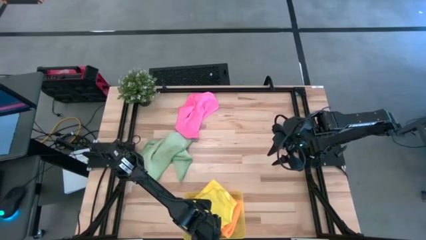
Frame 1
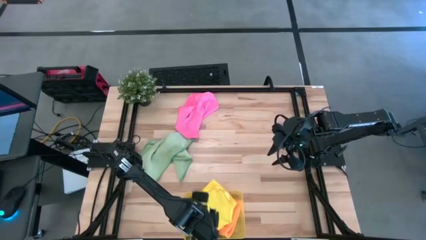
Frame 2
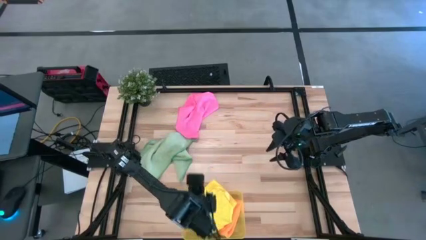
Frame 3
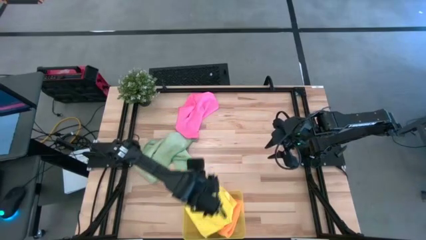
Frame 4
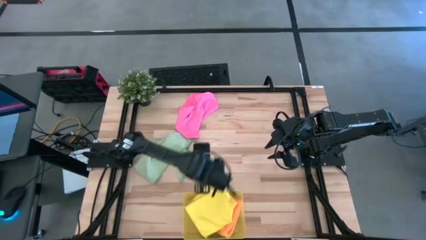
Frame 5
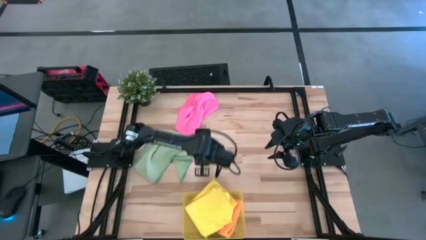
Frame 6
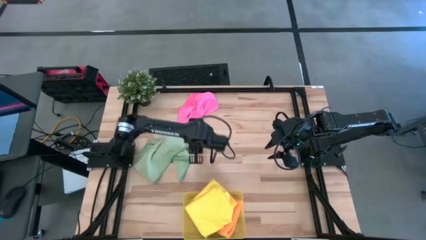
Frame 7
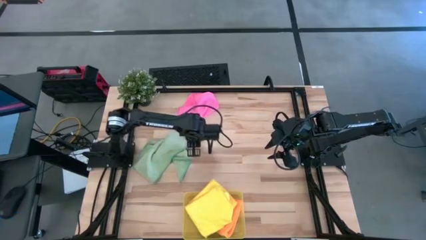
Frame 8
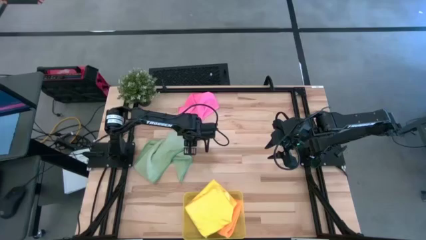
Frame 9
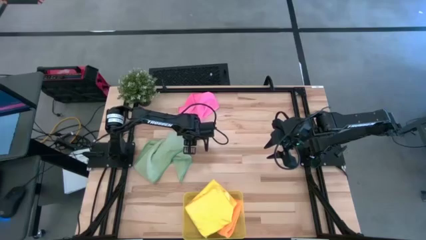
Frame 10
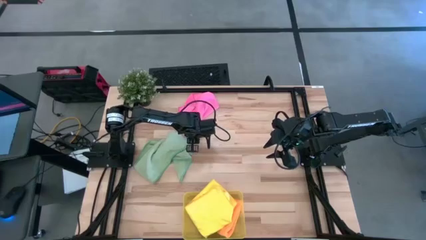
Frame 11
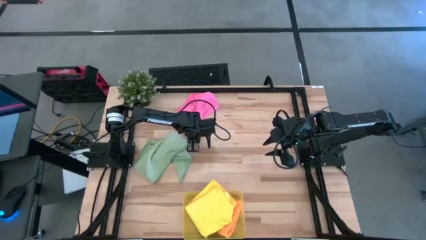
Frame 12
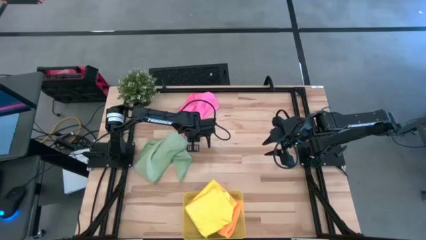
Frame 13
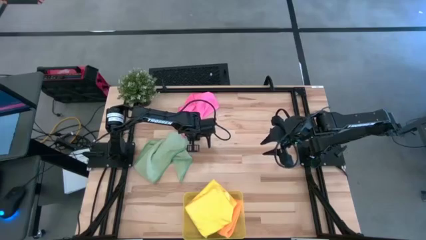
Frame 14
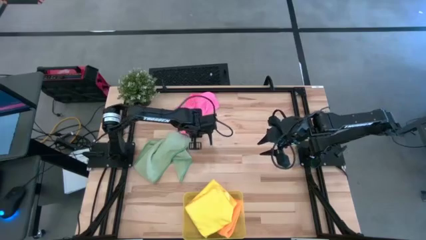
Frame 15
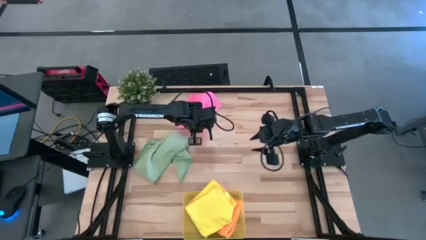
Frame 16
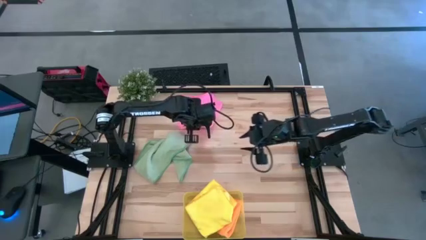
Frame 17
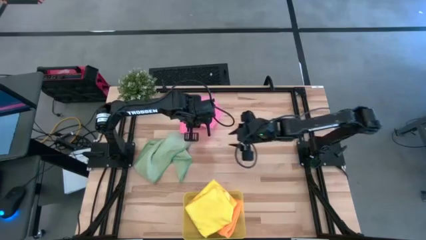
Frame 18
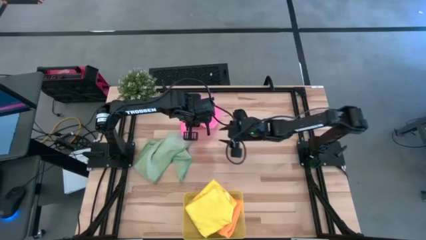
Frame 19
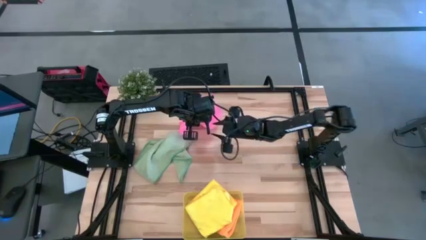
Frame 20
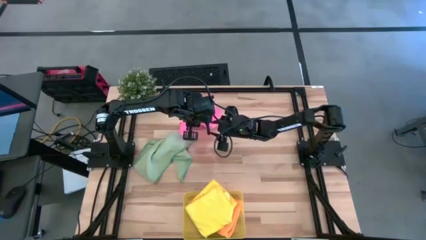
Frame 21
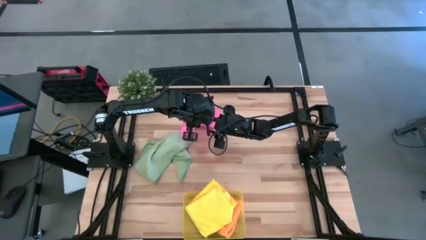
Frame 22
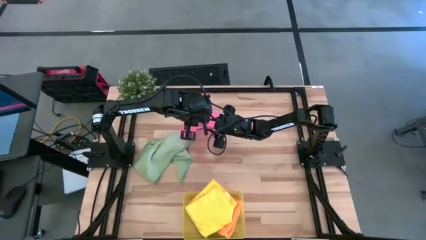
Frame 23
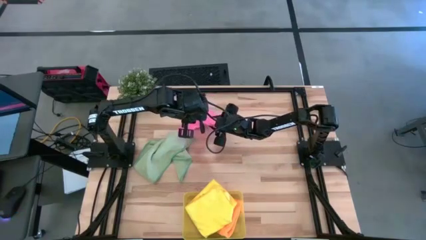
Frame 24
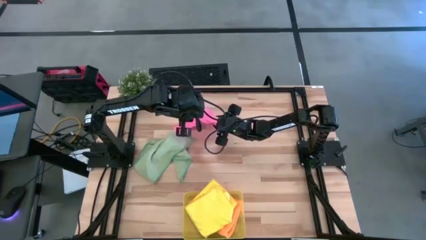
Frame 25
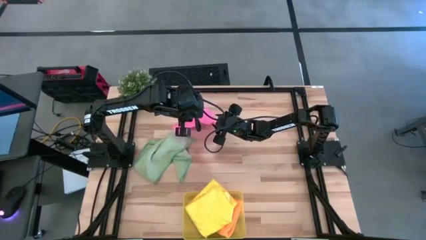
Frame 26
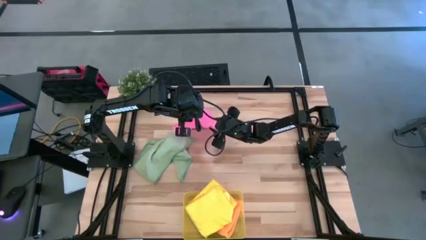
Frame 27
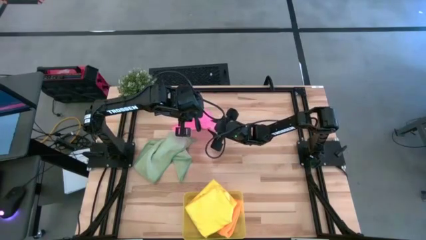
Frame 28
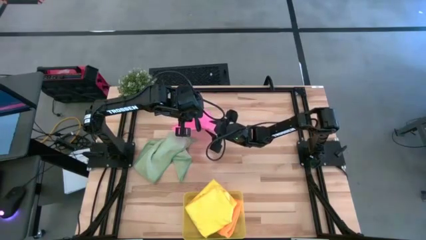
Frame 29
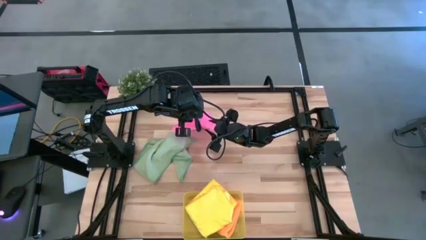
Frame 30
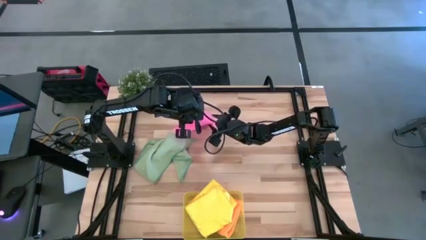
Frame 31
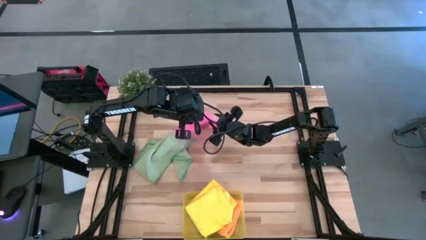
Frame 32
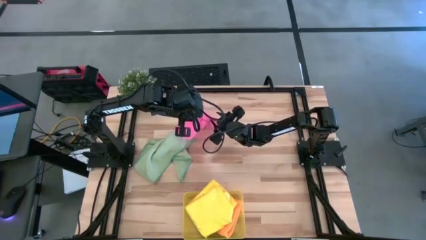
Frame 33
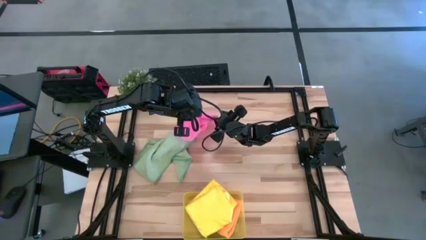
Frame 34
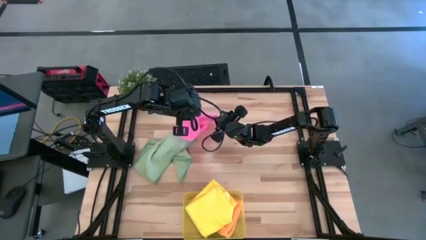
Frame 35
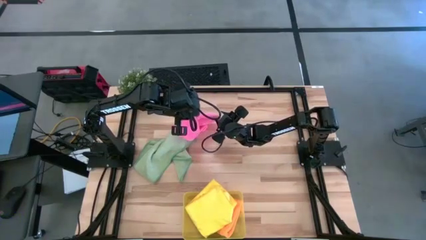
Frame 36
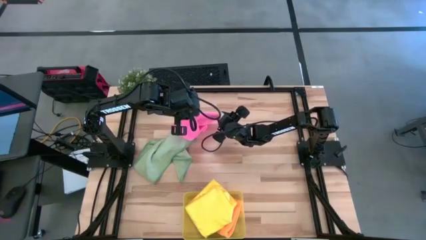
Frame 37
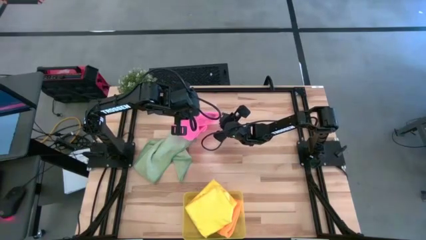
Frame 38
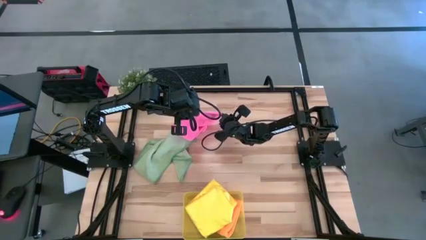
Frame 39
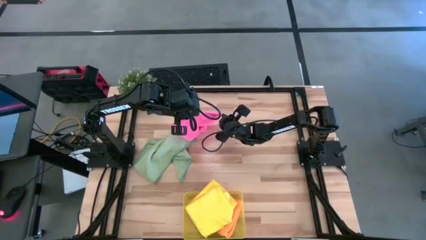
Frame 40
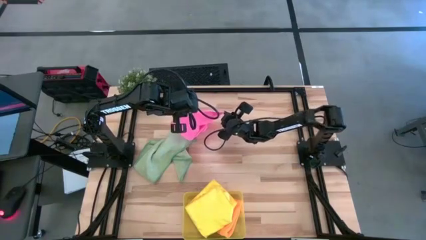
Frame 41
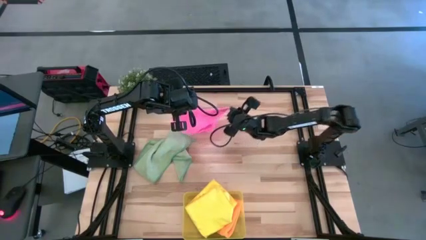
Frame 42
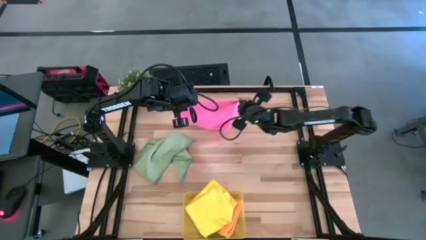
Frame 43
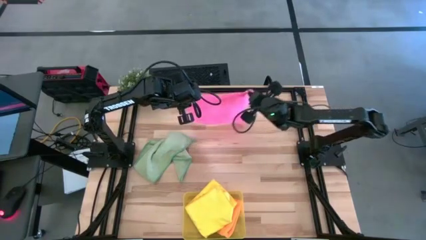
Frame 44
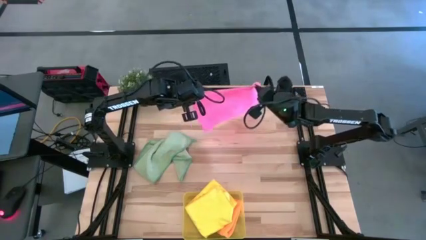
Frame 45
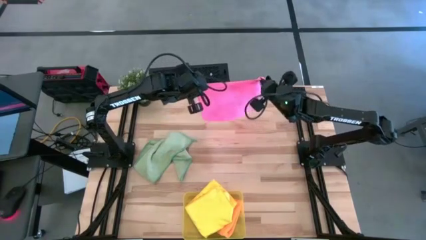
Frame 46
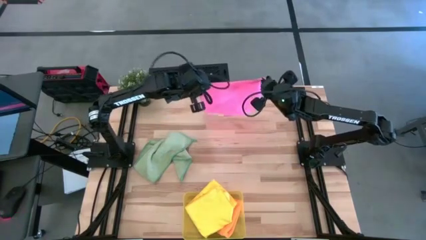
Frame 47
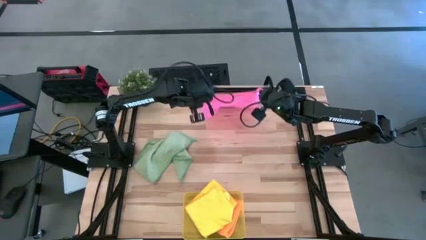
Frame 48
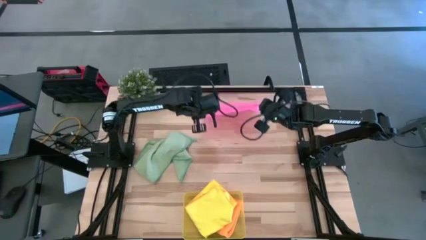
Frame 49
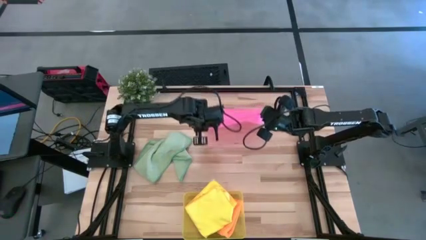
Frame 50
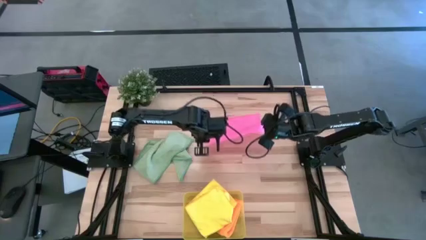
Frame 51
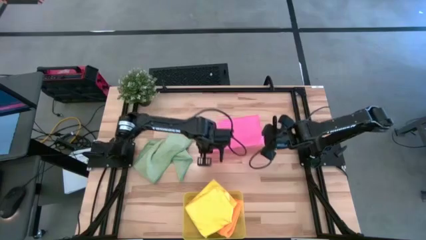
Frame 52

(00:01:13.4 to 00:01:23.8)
Task: Fold microfiber towels
Fold the pink microfiber cloth

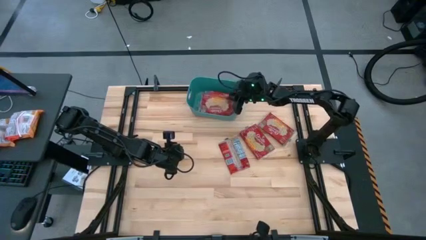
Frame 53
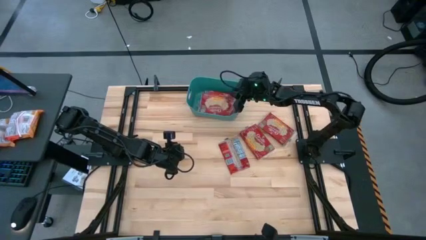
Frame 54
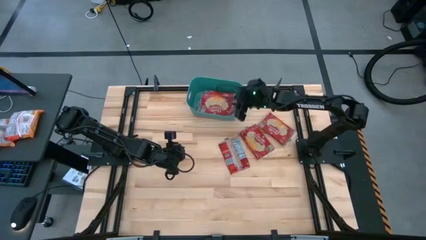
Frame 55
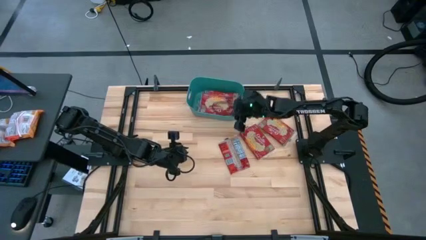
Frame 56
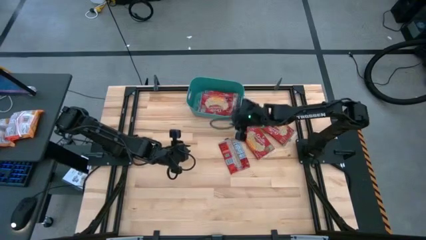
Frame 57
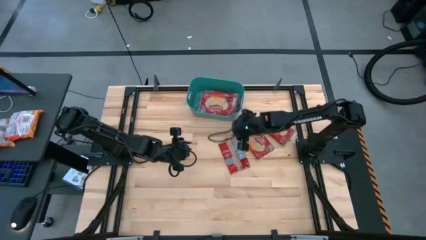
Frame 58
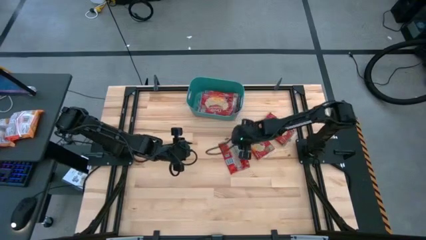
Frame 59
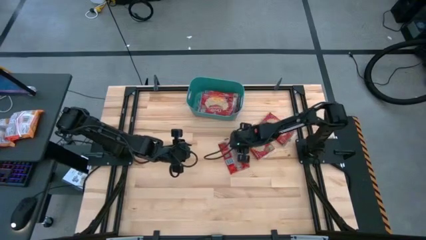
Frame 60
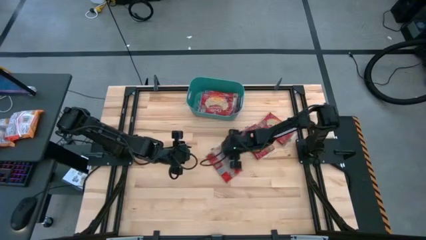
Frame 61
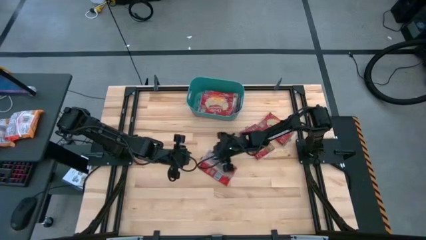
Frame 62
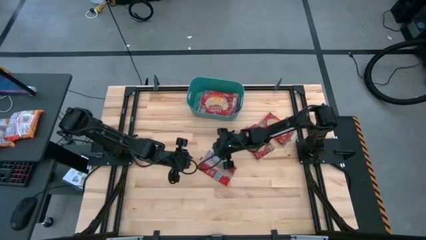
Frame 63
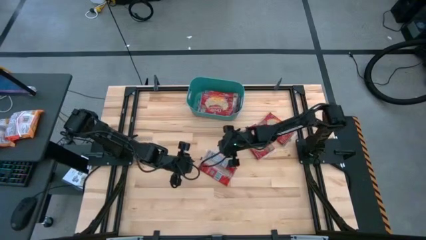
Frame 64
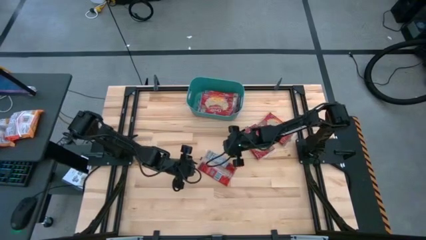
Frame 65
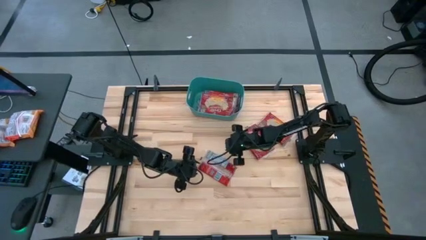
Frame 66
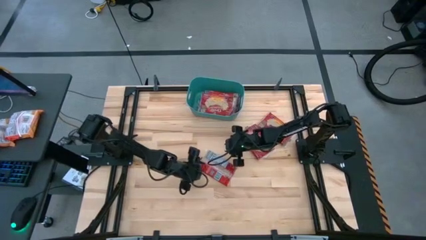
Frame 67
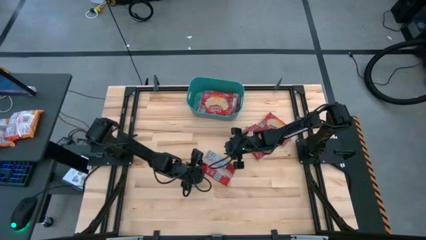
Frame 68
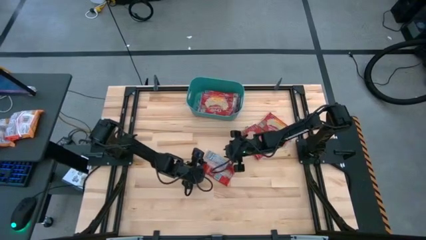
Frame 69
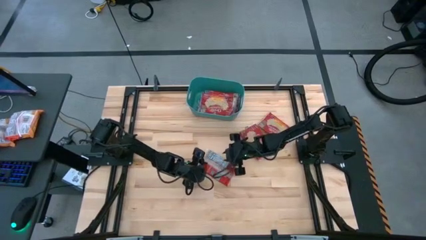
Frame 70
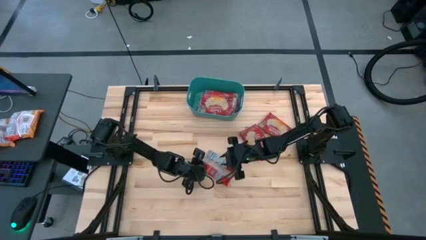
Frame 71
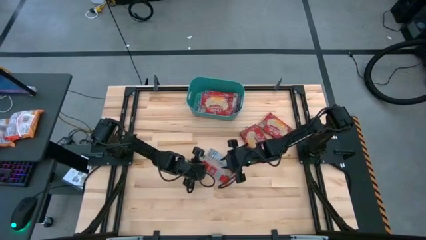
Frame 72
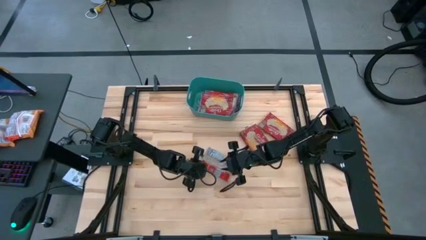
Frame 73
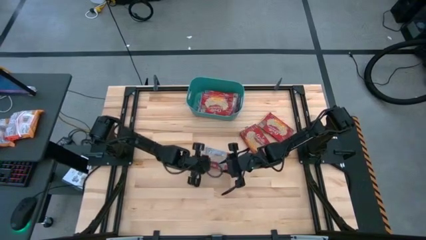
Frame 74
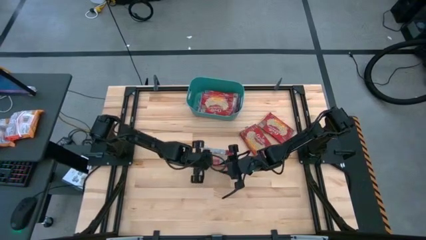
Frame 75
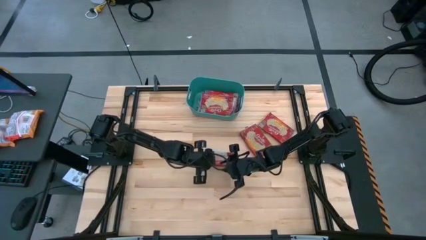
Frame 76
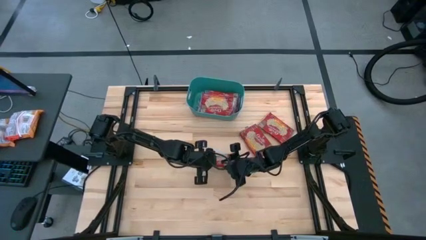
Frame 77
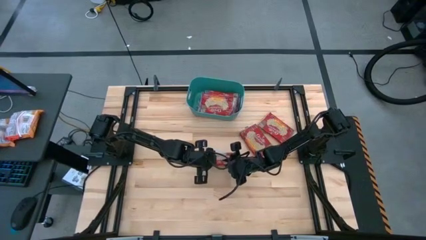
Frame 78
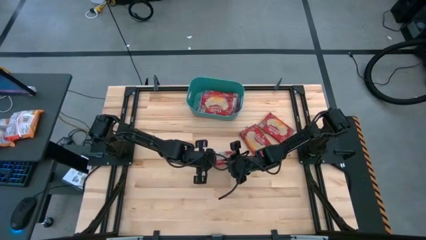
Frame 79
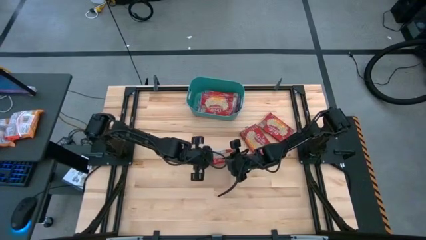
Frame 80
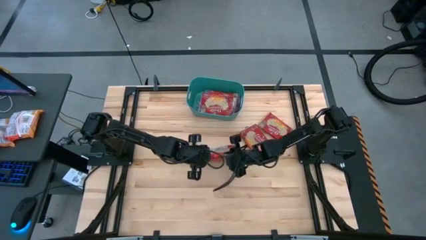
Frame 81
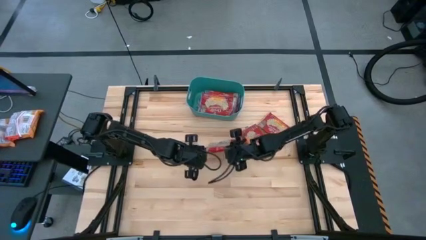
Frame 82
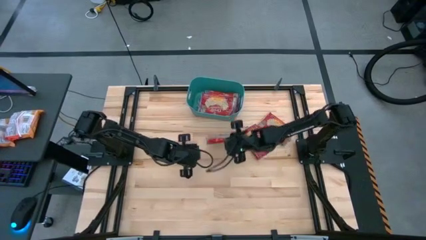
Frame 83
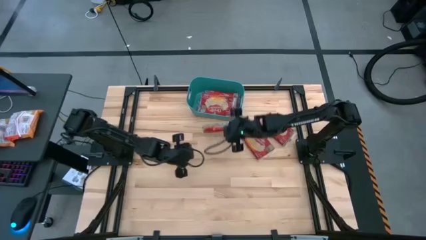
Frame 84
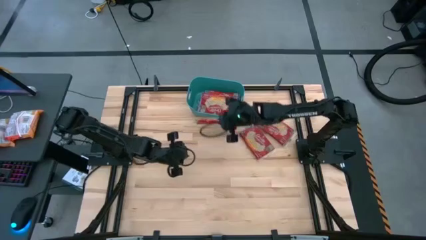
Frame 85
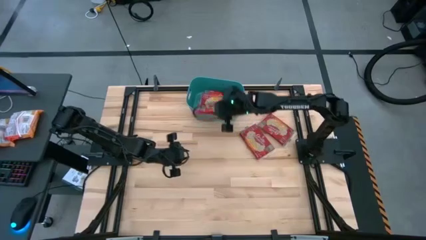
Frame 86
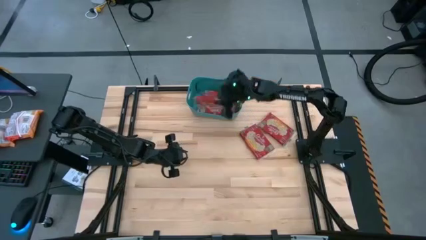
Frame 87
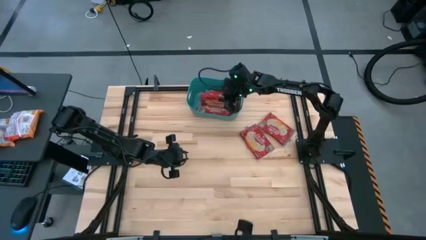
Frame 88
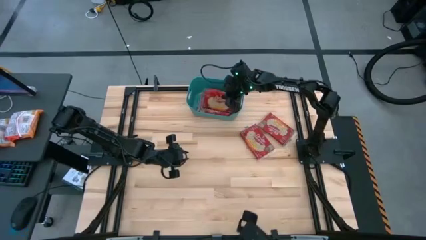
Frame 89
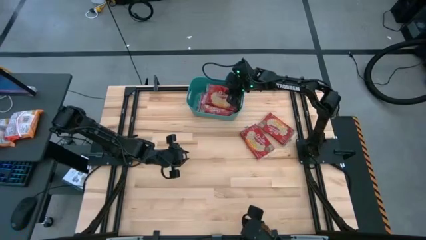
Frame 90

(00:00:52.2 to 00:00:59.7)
Task: Sort popcorn bags into baskets
Put the red popcorn bag into the green bin
